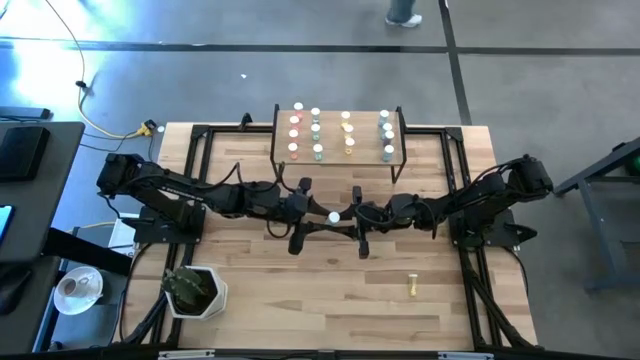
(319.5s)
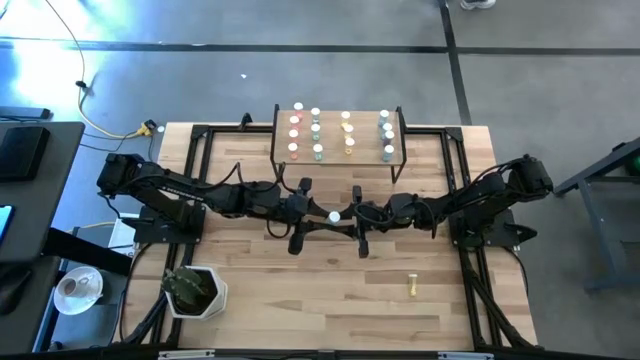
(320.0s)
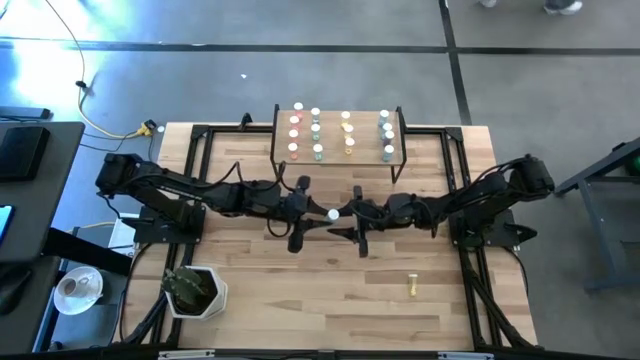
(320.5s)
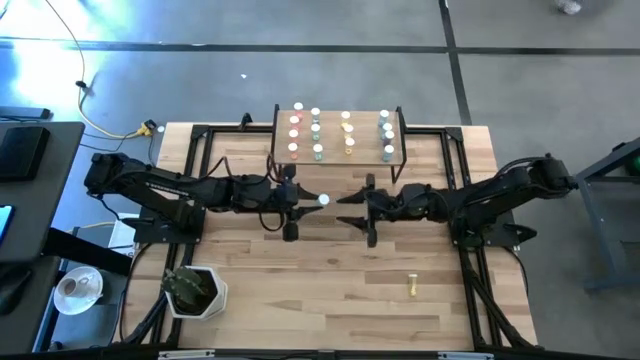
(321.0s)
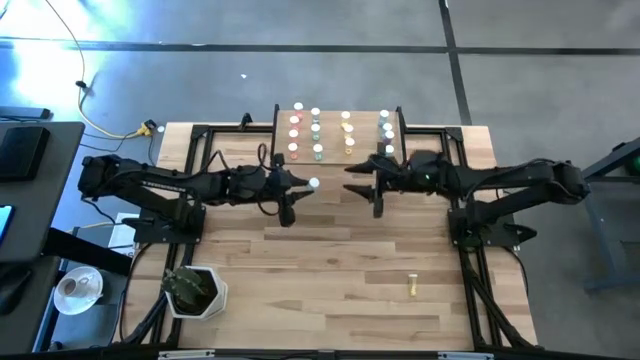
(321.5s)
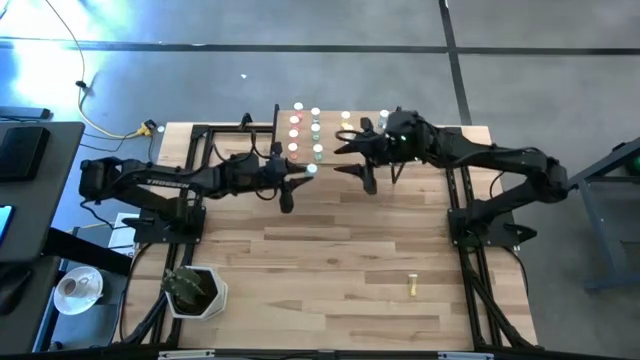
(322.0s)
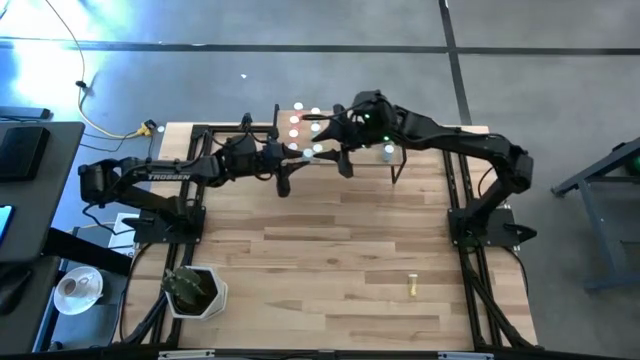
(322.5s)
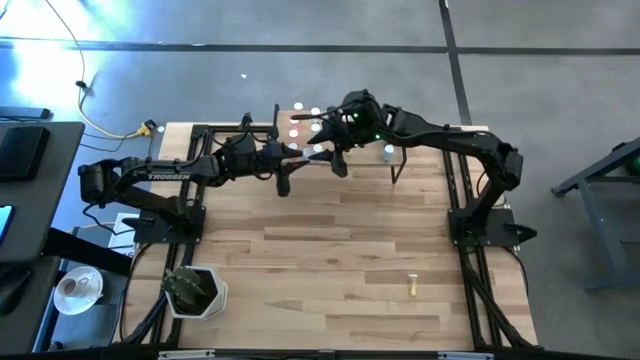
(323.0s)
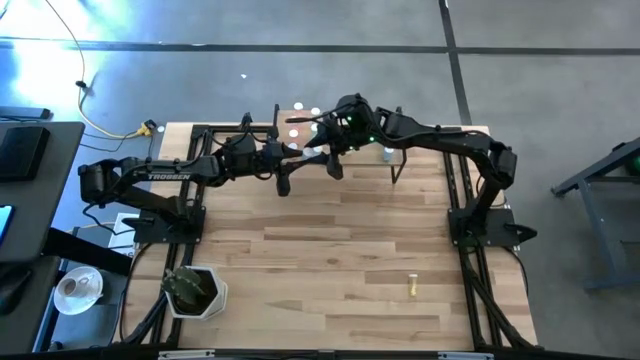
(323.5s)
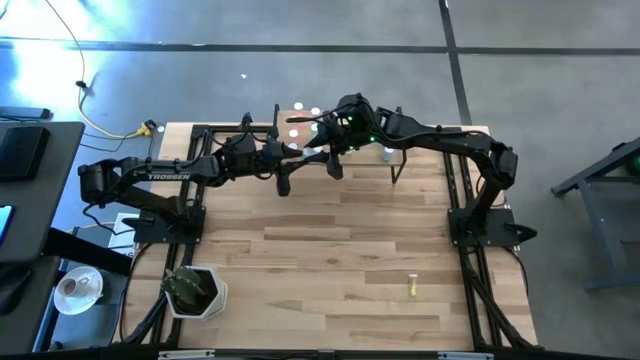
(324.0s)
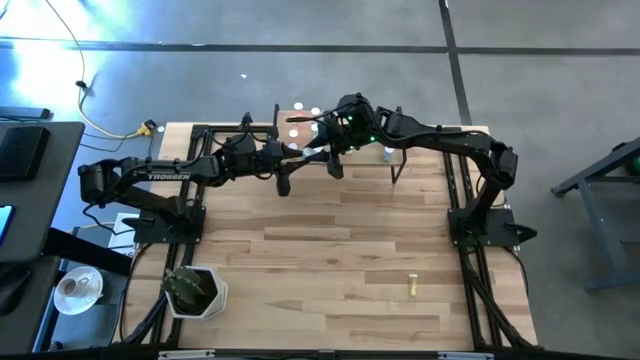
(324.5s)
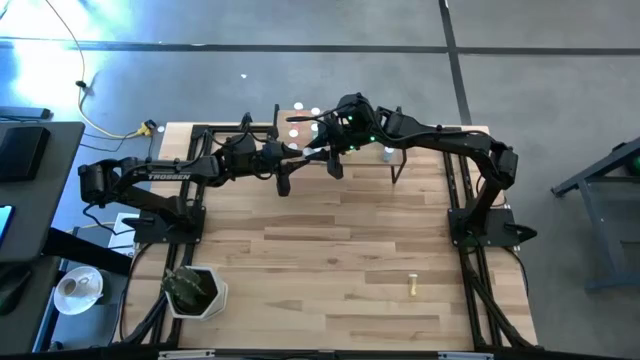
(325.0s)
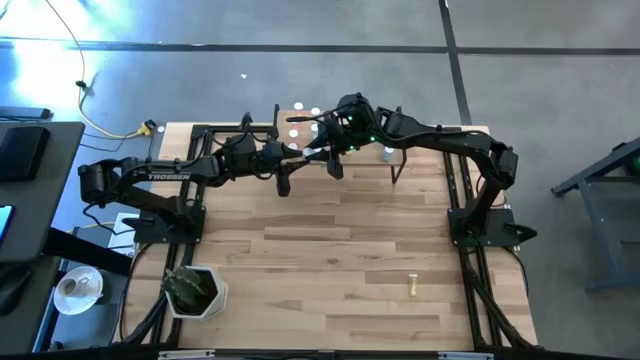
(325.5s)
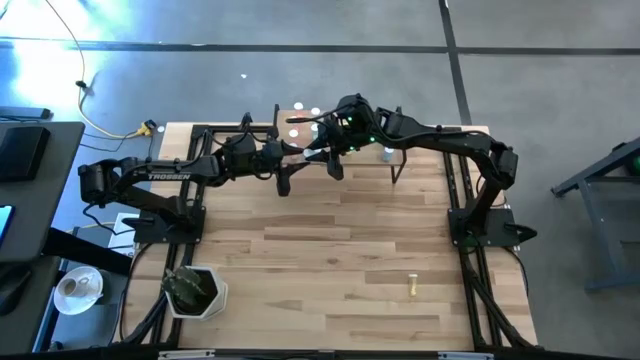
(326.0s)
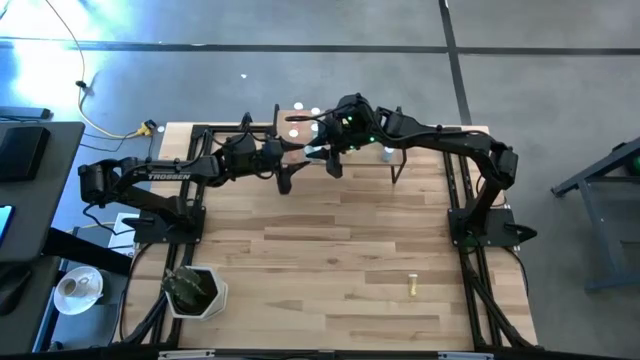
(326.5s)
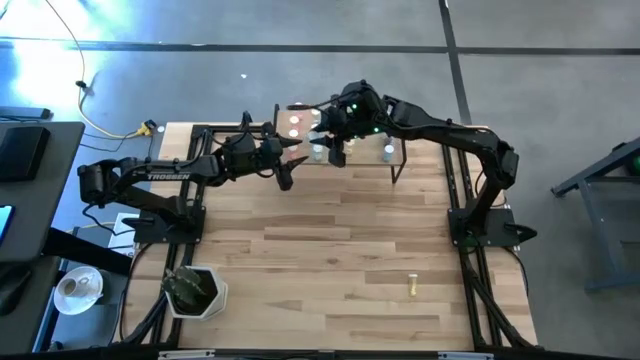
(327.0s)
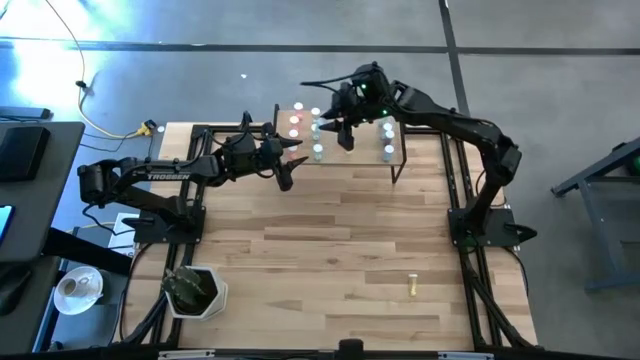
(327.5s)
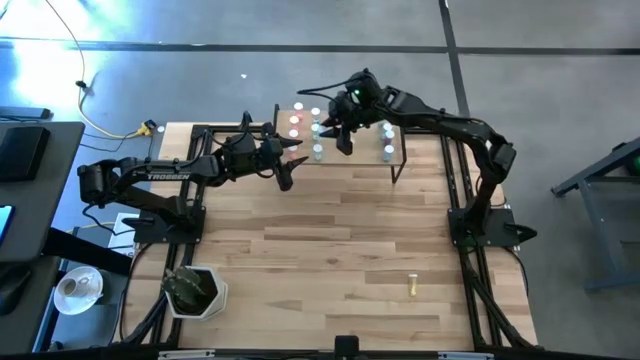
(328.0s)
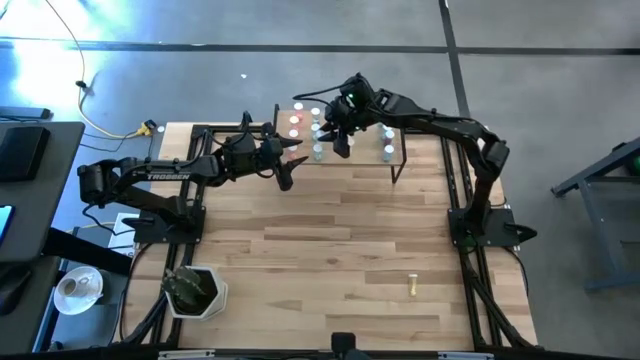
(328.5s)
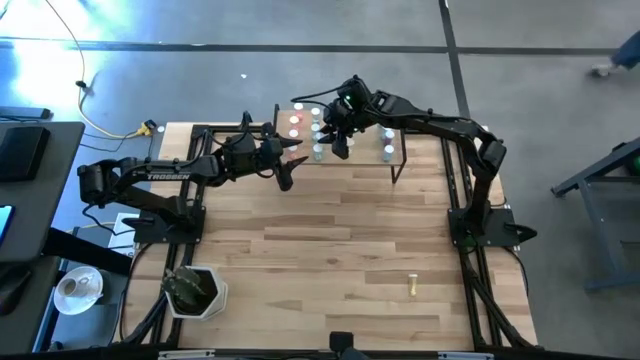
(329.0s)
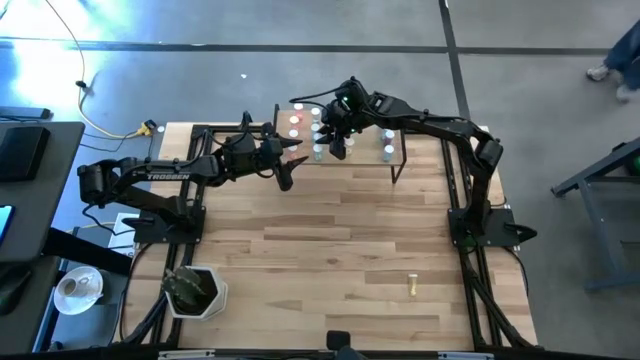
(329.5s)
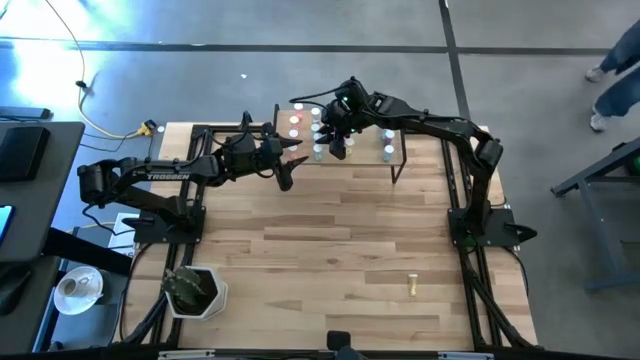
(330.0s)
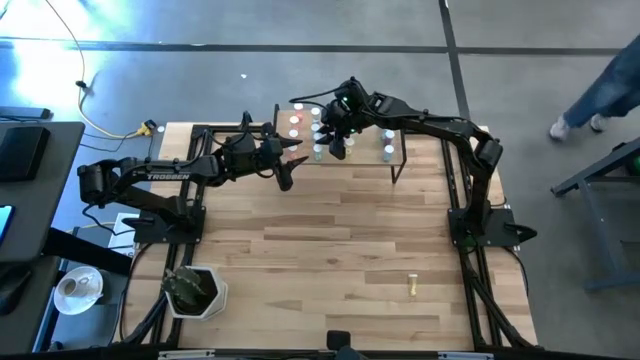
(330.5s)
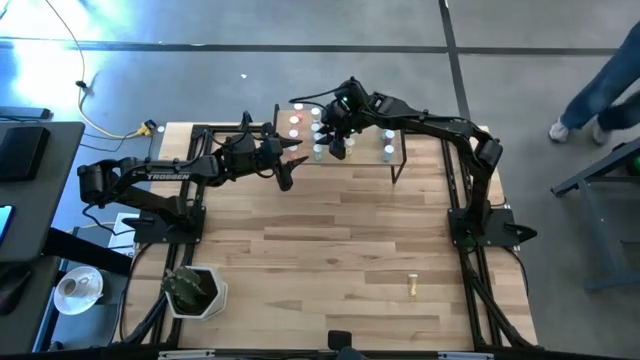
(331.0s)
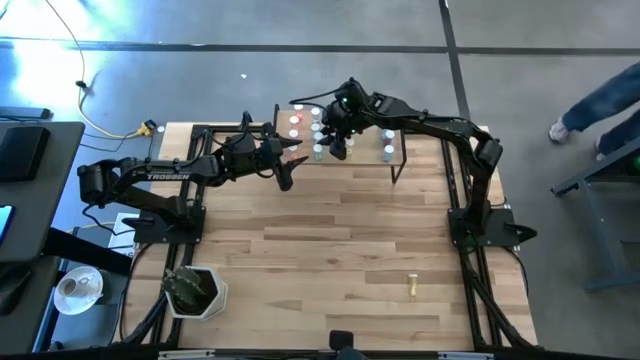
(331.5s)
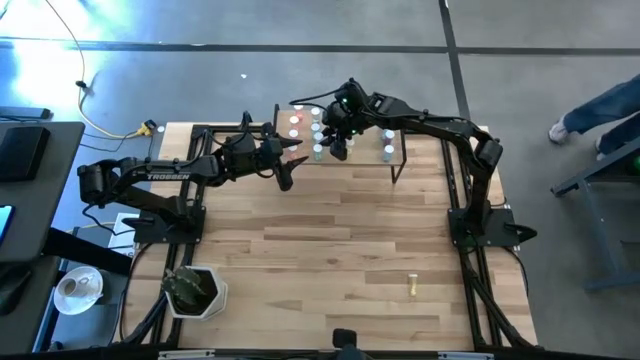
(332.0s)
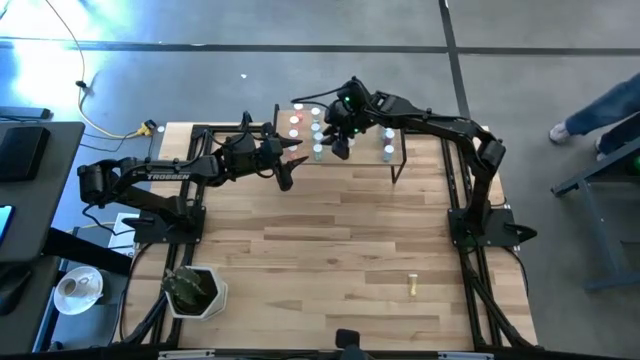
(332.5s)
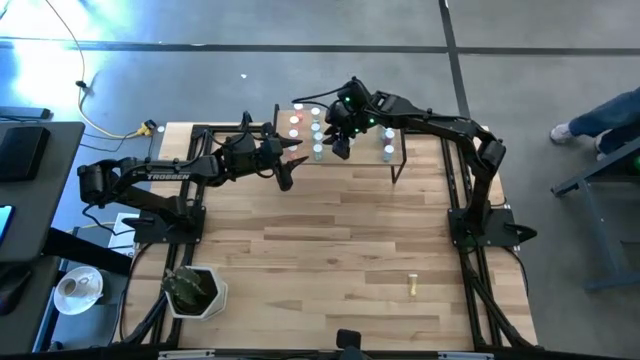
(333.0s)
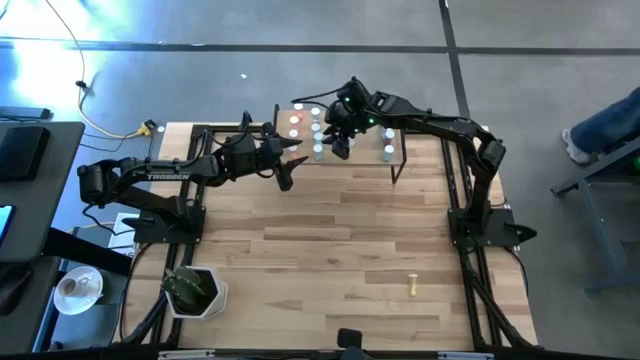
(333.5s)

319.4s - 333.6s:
Task: Pick and place medicine bottles onto shelf by color
Put the light blue medicine bottle on the shelf

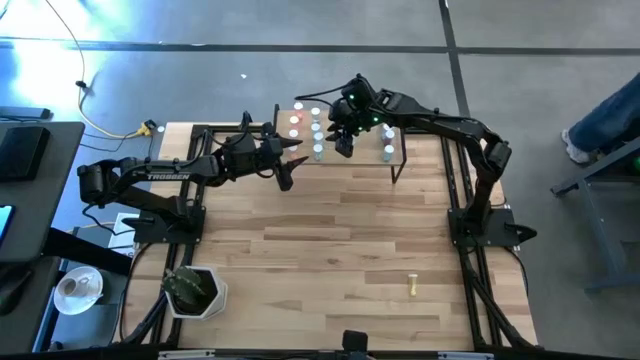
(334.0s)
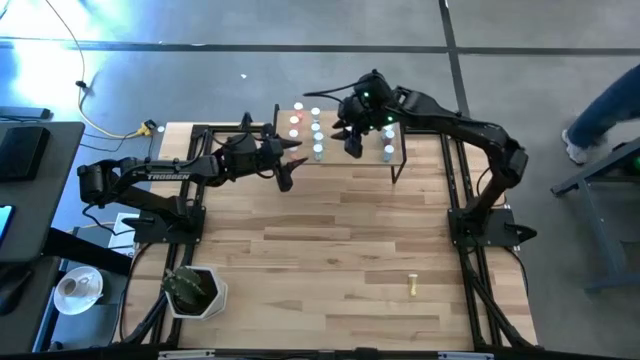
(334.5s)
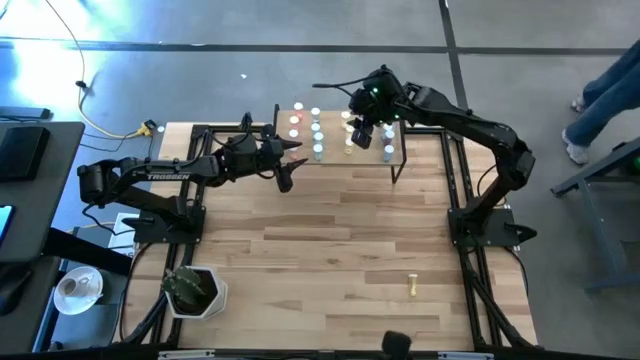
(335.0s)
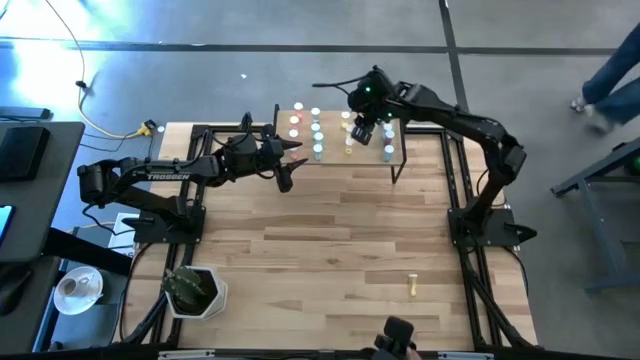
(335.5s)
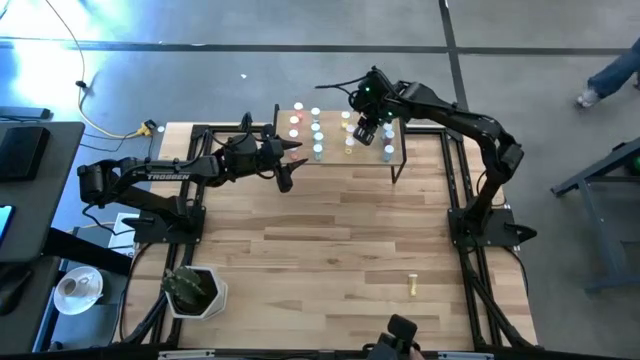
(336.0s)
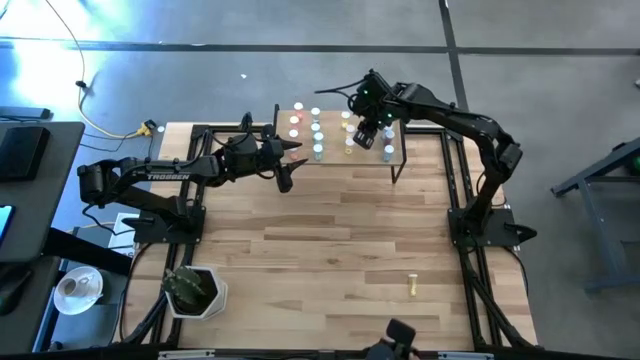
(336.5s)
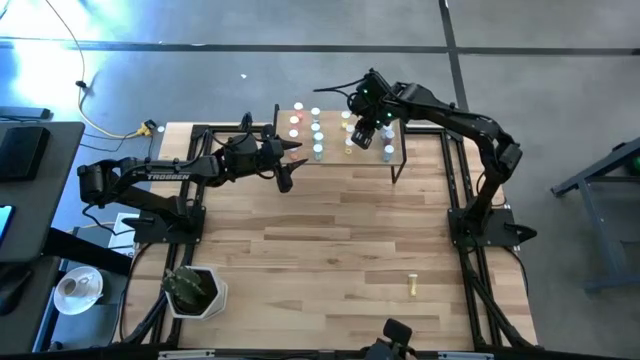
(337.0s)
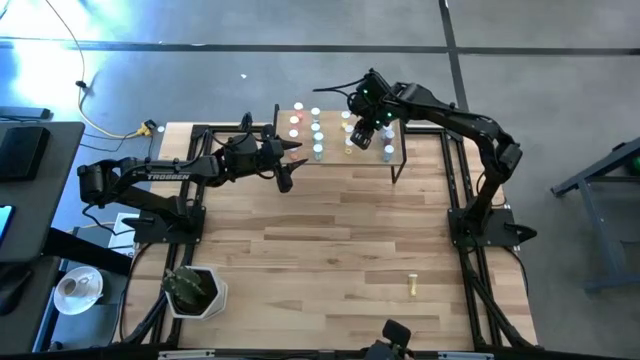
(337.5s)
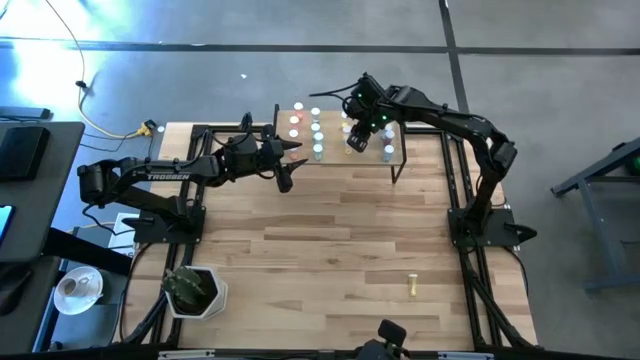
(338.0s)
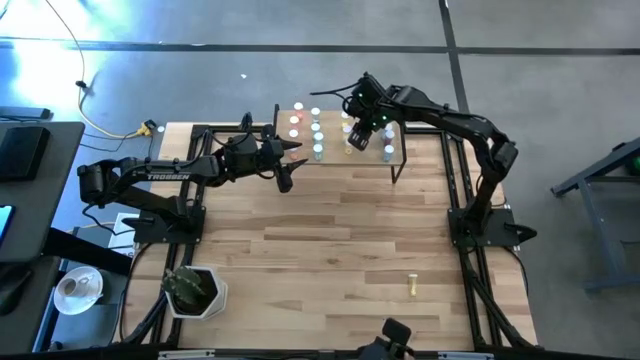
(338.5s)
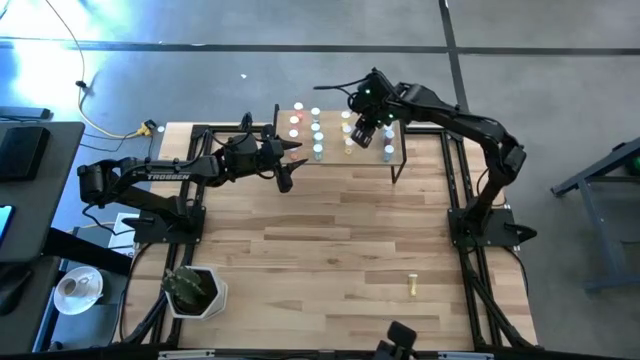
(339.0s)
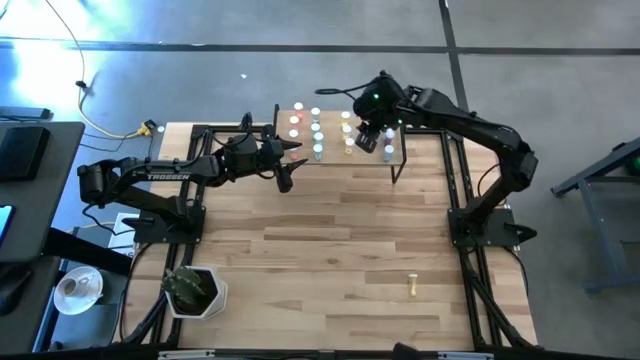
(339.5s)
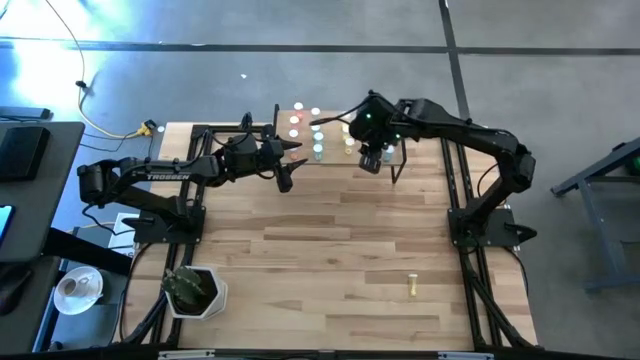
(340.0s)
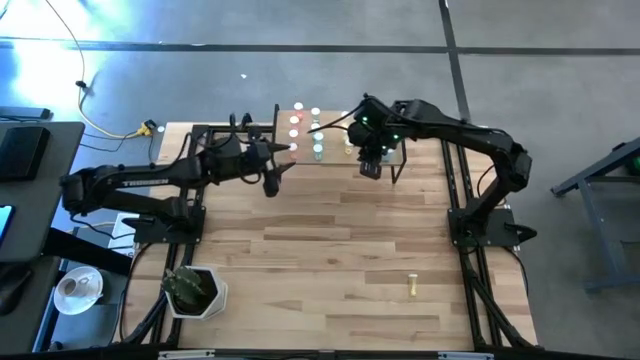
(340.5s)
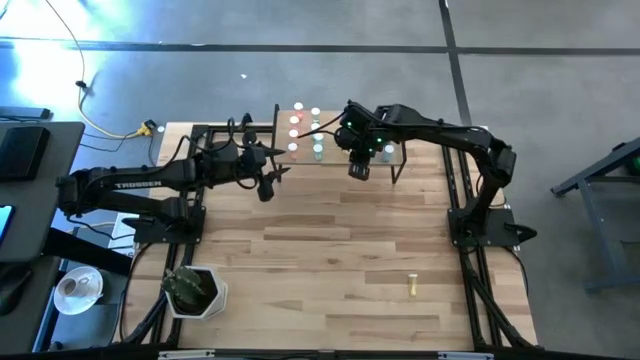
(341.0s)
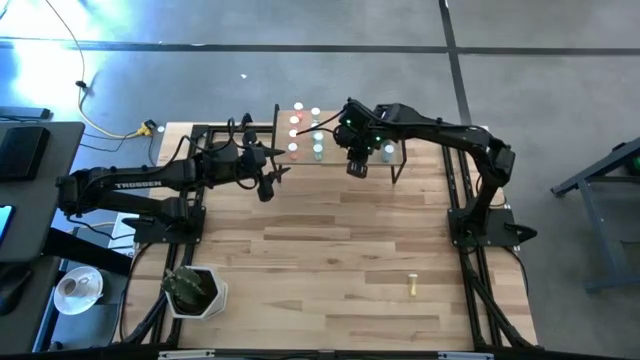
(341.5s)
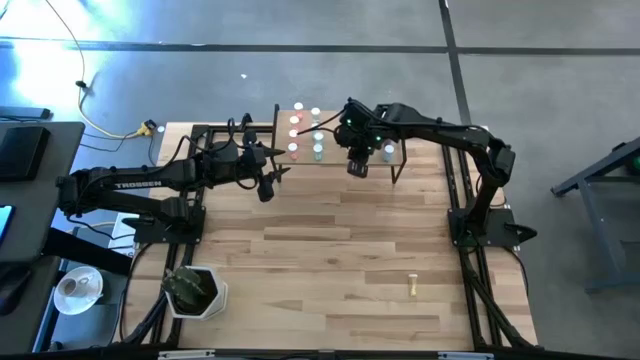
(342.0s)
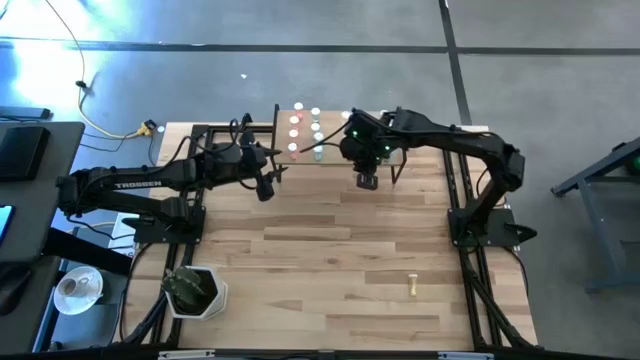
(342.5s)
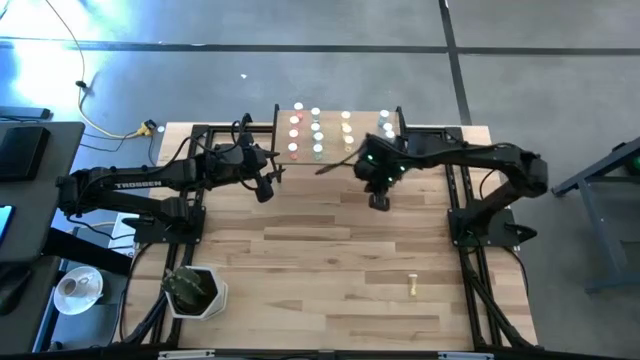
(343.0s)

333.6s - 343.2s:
Adjust the medicine bottles on the shelf
